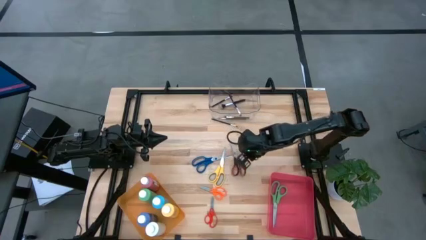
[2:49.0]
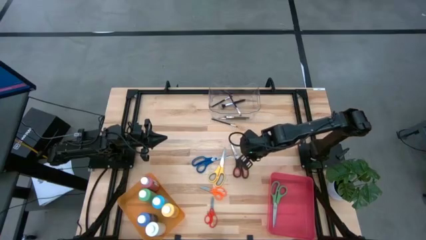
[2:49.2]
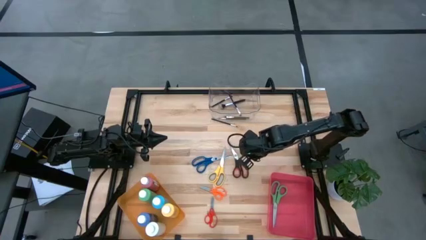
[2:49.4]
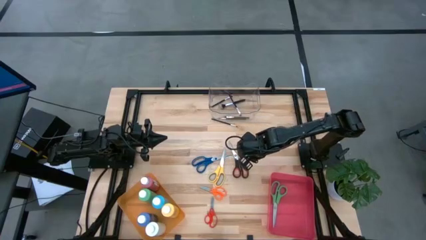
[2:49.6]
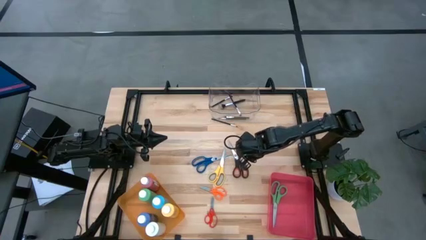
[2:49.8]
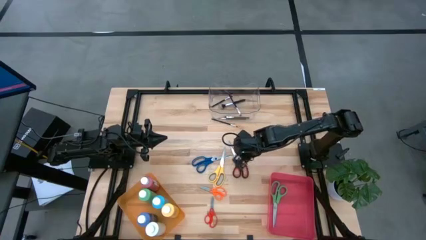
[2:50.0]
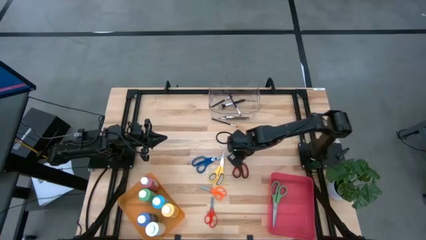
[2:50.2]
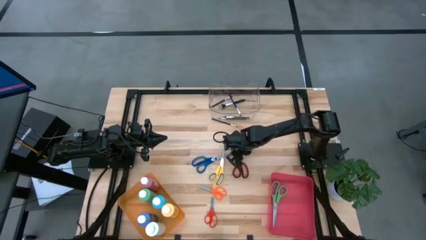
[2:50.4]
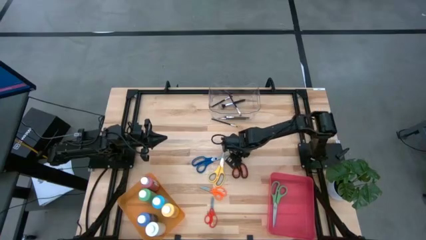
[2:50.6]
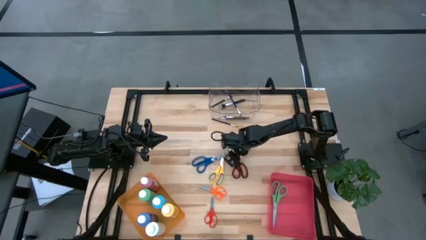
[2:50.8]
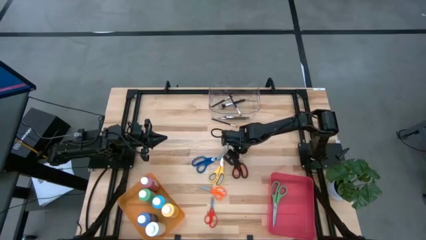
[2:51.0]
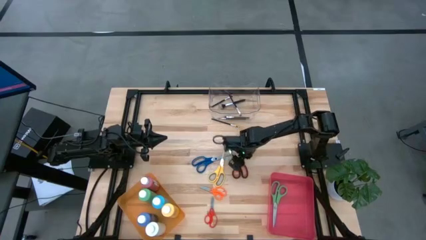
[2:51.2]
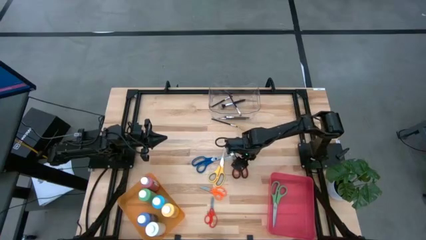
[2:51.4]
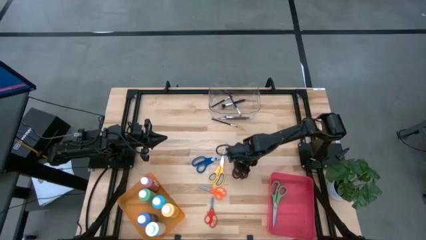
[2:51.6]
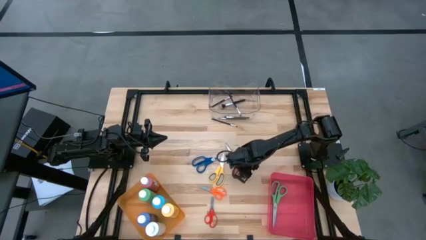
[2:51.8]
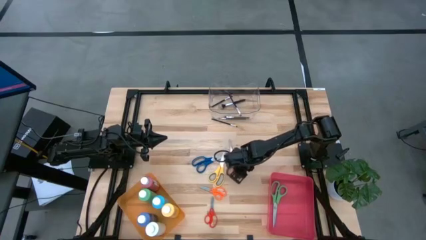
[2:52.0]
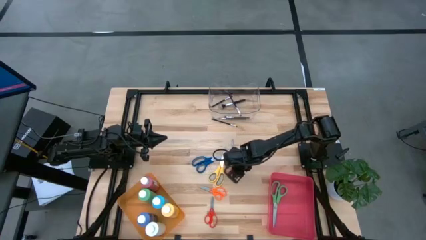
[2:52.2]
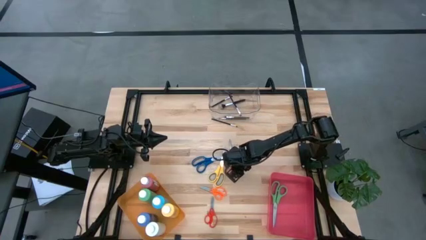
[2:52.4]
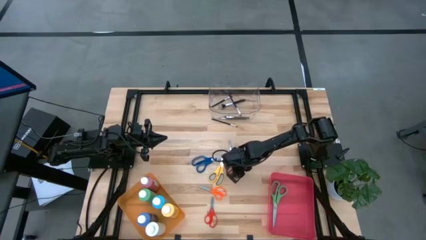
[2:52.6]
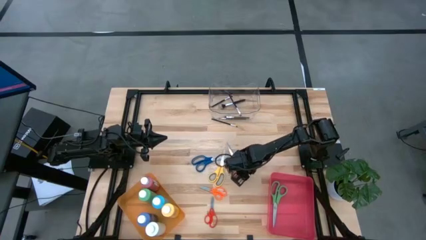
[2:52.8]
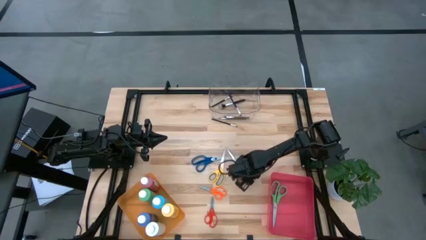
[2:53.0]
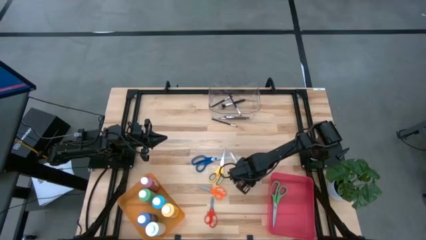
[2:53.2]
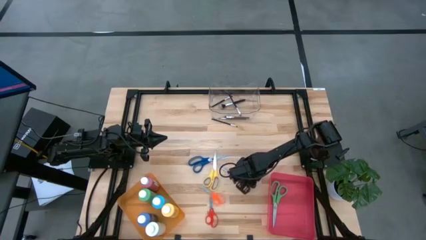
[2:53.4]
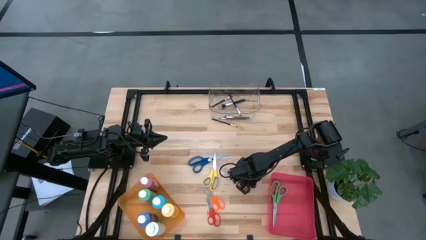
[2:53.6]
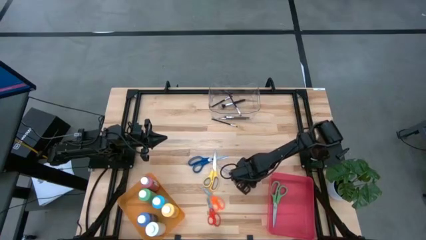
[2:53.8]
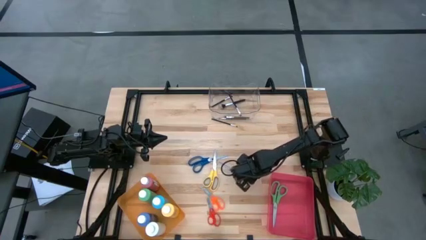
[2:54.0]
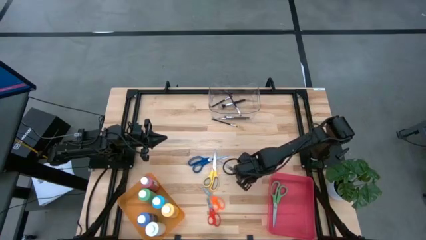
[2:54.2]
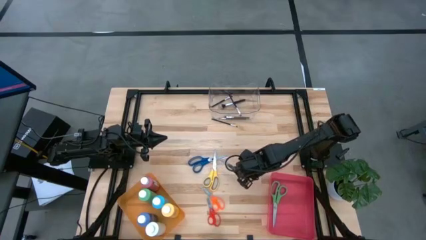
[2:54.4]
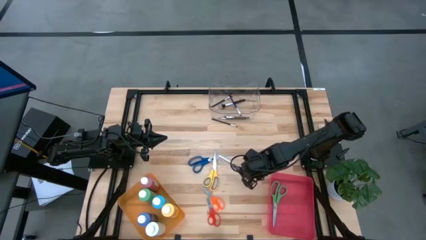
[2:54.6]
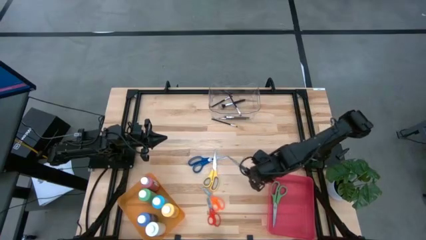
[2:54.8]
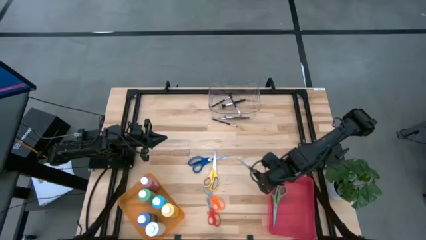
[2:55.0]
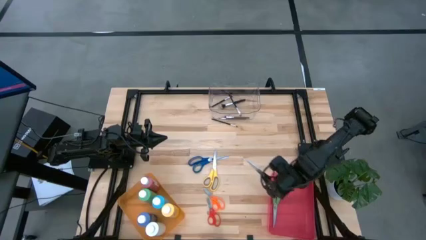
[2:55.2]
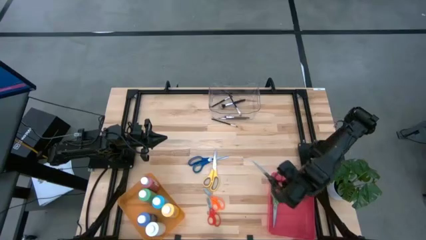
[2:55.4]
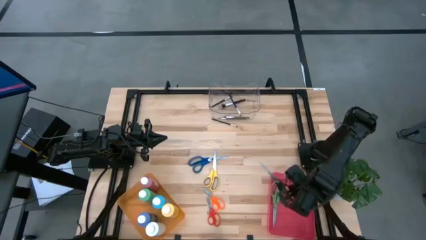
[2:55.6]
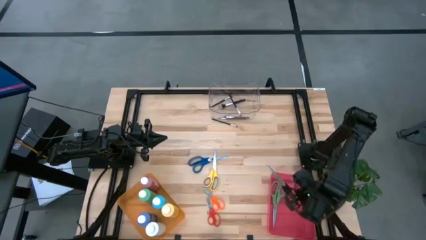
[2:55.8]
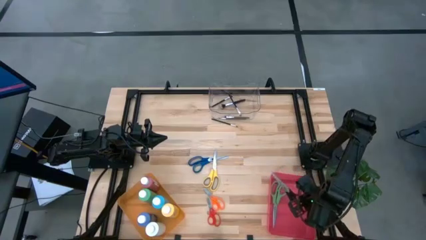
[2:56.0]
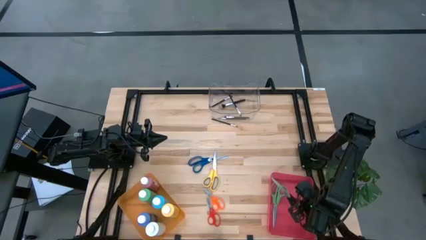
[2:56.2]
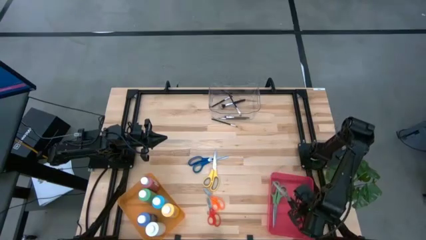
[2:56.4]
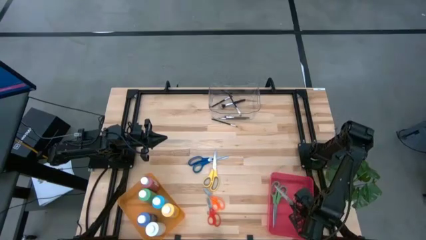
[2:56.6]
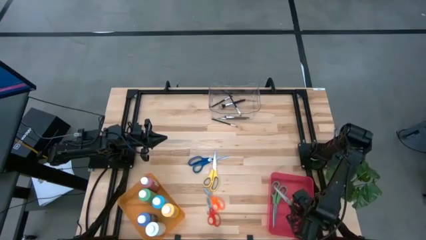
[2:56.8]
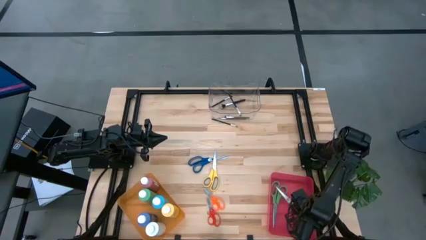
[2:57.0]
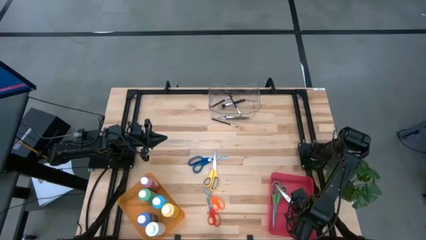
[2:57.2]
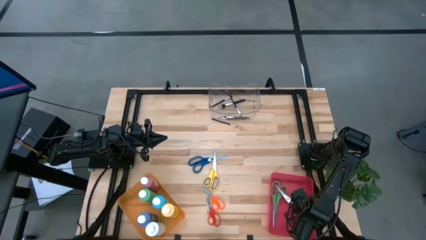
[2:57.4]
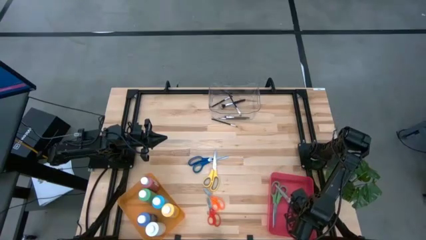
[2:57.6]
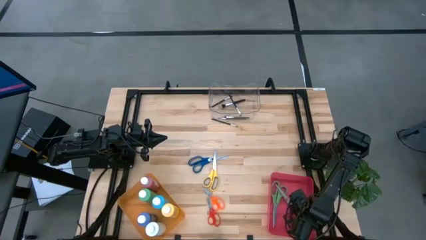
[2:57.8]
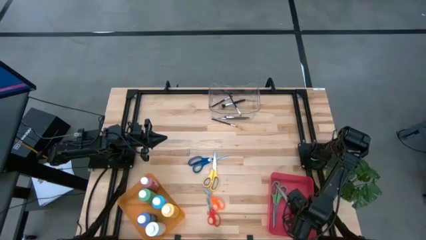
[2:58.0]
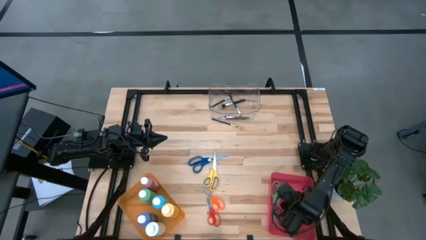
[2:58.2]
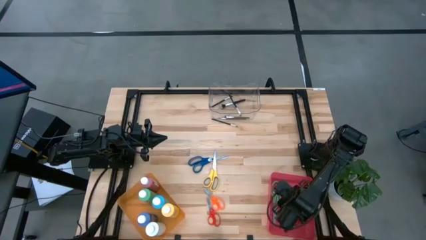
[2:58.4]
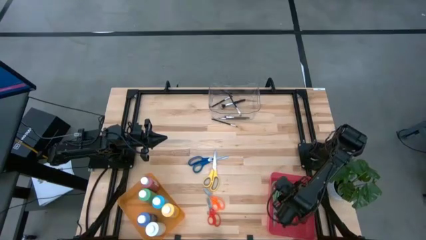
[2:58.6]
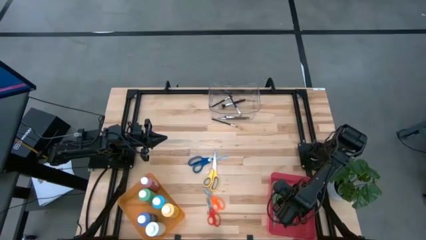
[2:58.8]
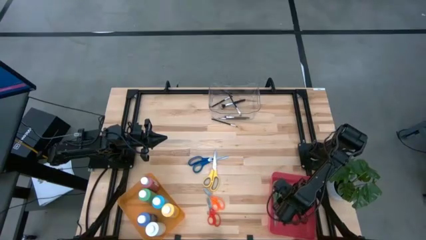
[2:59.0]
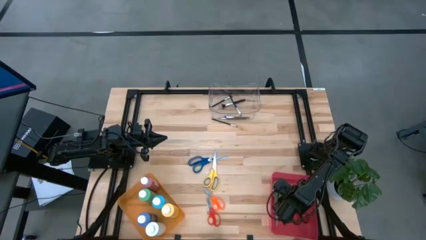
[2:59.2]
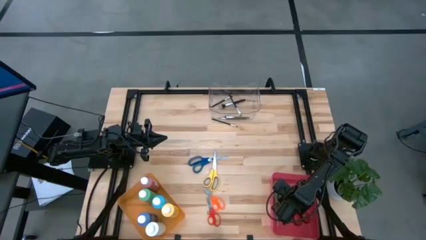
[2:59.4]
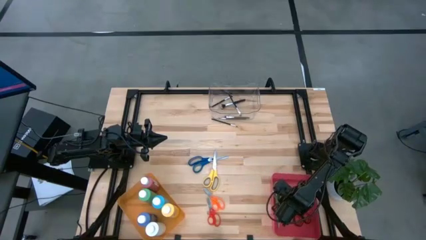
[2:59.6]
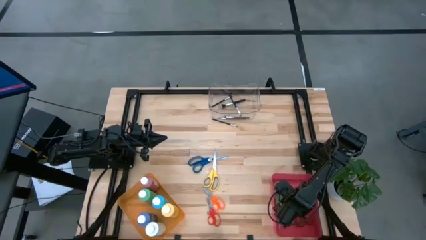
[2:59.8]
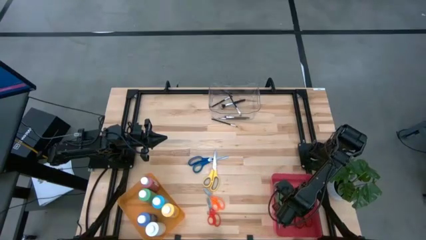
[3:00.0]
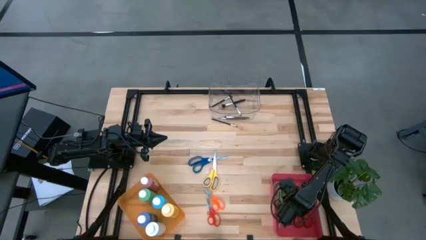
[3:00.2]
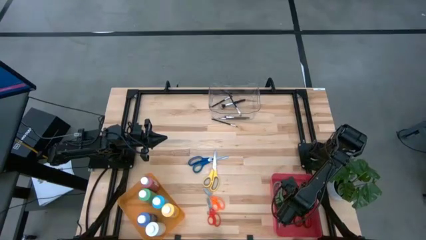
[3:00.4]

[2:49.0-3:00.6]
Task: Pick & Place Paint Supplies
Put the black scissor into the red bin

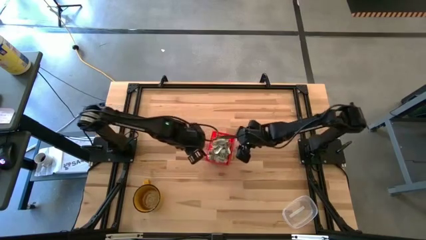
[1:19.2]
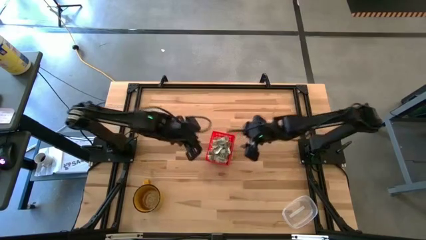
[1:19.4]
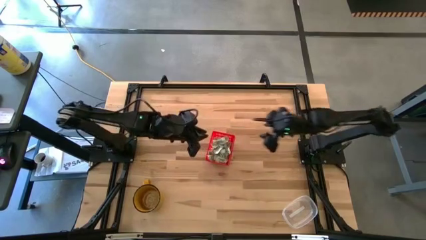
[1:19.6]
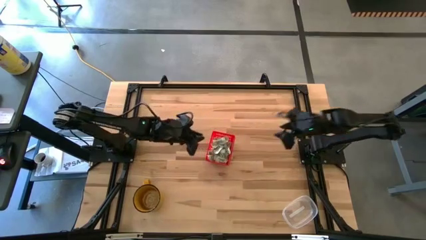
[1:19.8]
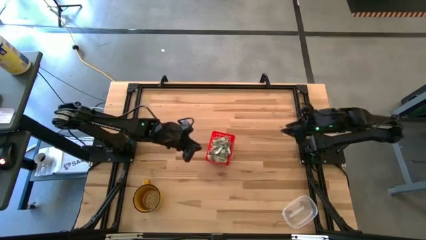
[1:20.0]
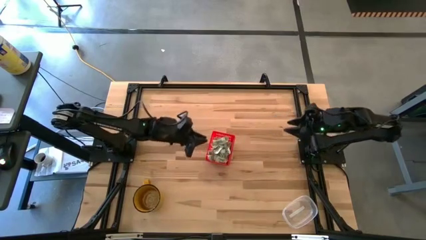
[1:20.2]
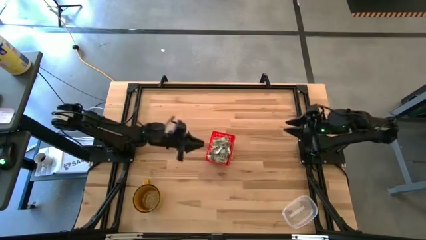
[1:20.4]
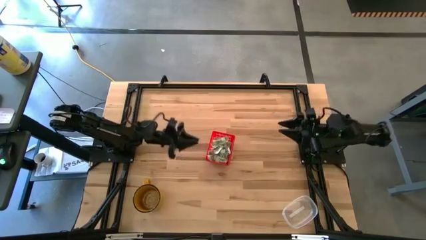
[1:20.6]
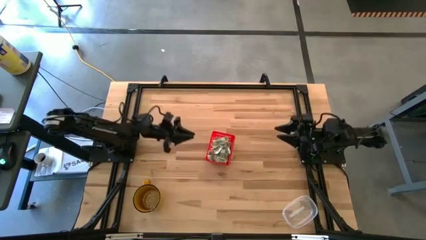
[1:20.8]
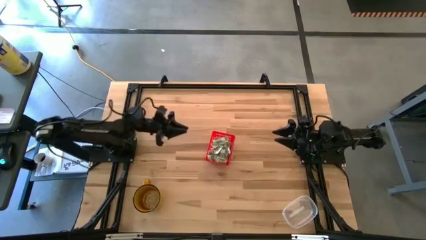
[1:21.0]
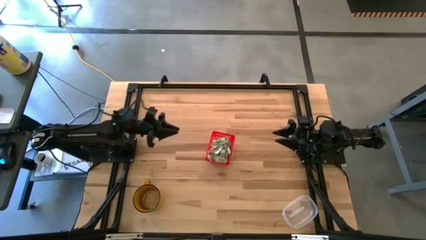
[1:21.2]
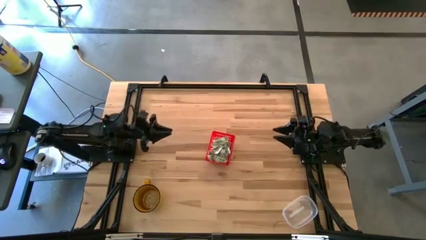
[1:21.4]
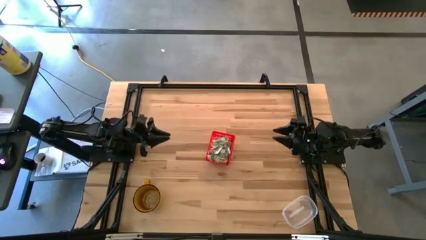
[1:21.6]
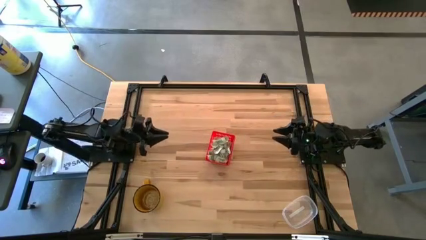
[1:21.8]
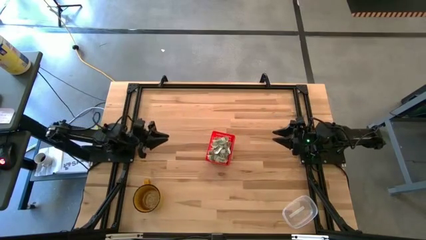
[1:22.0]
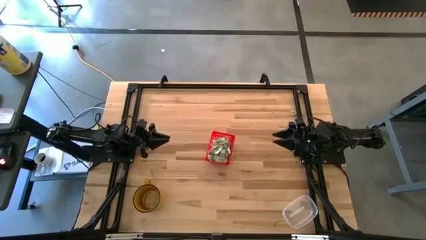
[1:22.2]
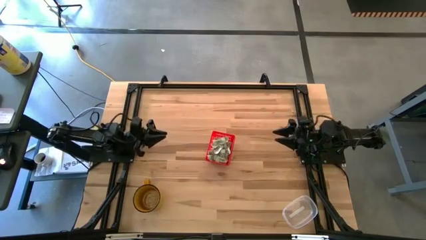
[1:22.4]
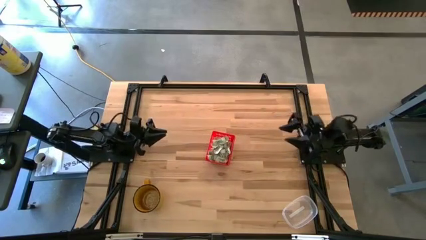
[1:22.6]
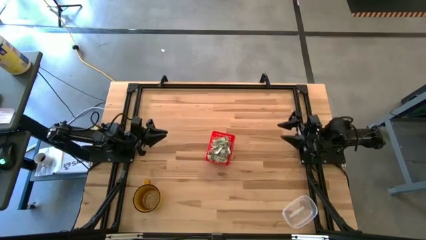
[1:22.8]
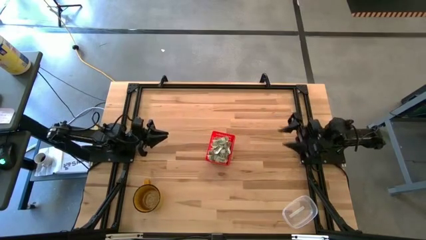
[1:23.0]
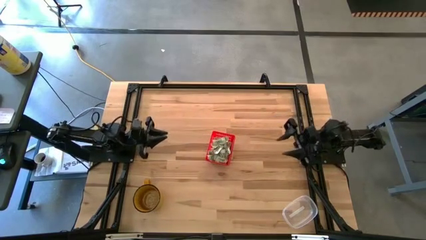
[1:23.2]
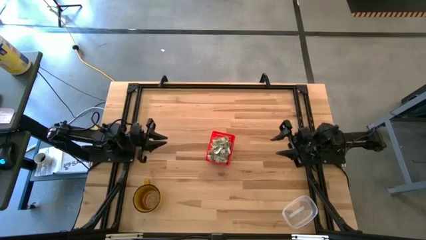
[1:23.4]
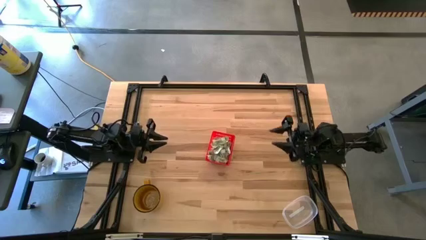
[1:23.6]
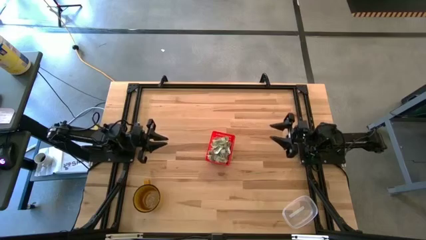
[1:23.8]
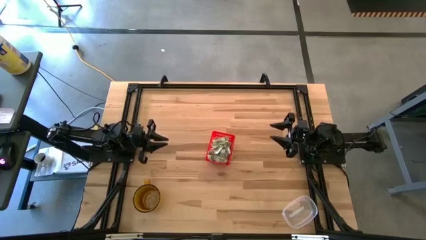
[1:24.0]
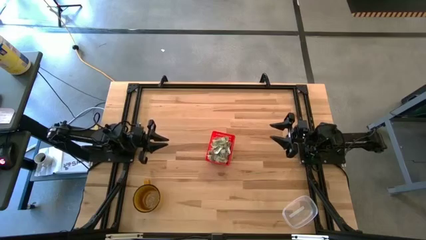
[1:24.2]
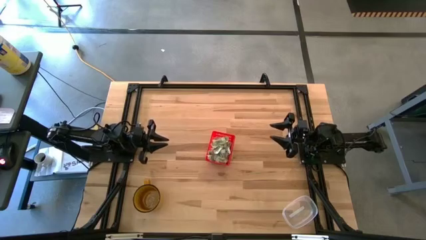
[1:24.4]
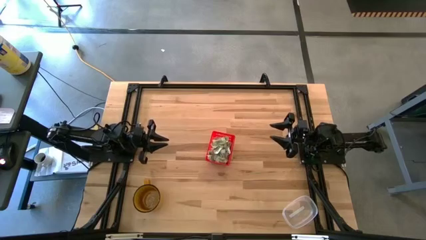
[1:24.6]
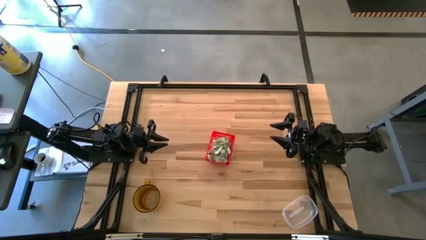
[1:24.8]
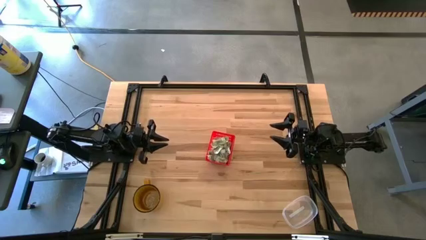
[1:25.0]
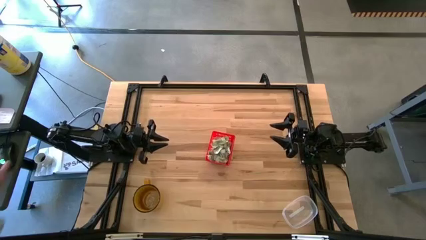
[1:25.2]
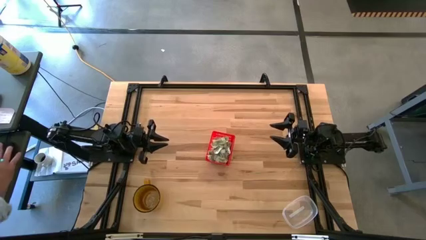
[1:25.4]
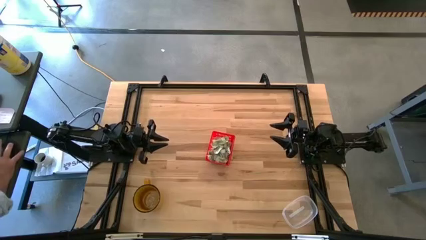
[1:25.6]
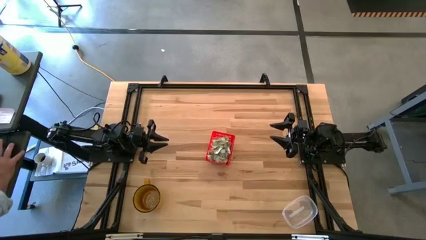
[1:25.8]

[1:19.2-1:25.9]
Task: Pick and place items into bin
Return to Home Position
